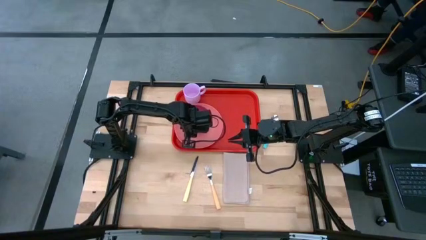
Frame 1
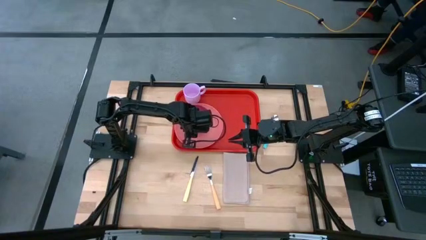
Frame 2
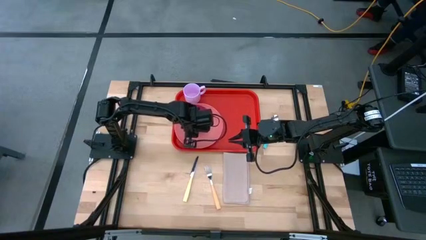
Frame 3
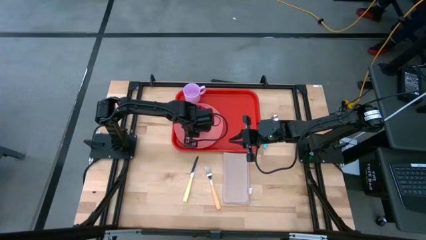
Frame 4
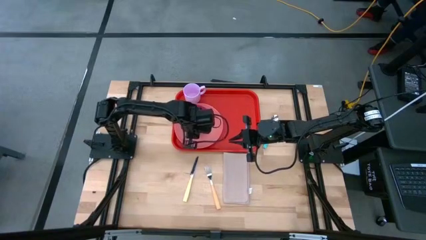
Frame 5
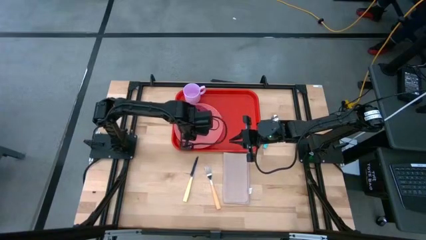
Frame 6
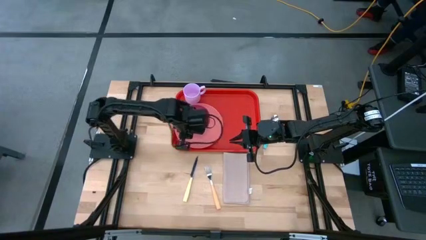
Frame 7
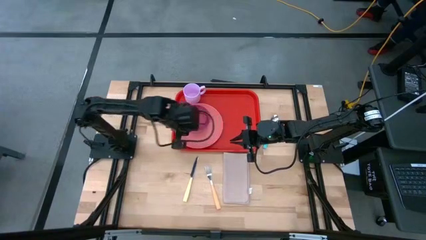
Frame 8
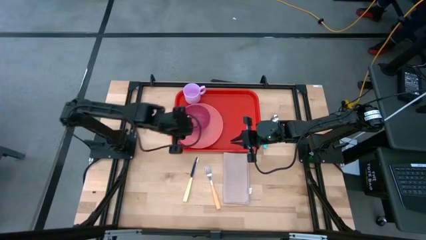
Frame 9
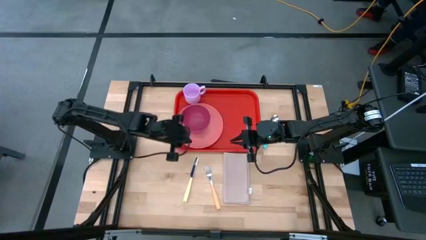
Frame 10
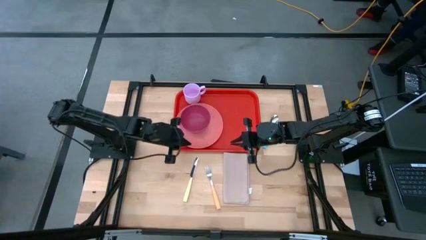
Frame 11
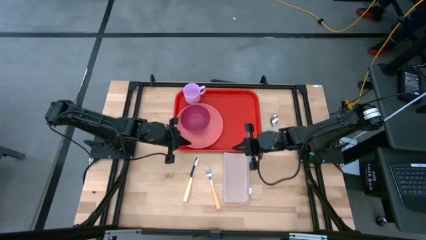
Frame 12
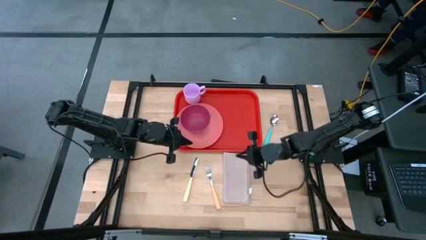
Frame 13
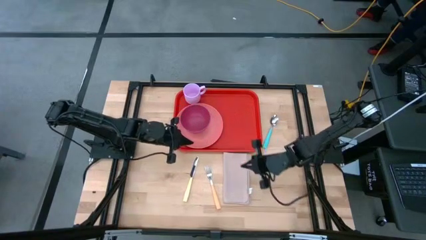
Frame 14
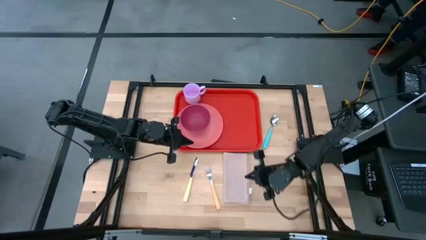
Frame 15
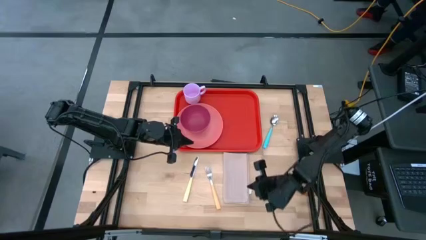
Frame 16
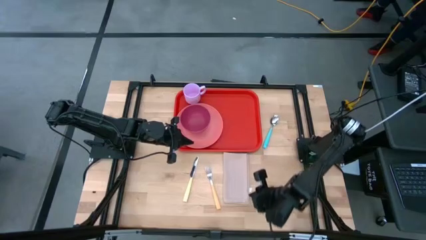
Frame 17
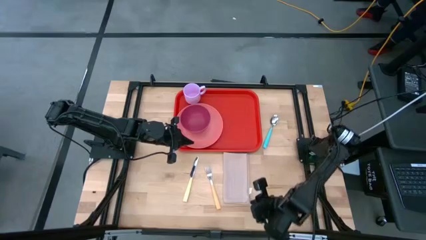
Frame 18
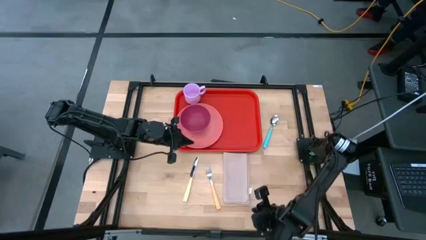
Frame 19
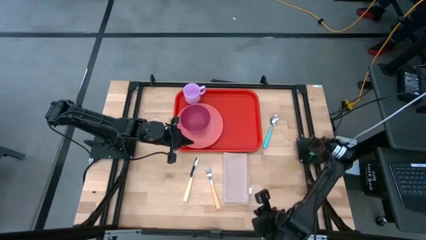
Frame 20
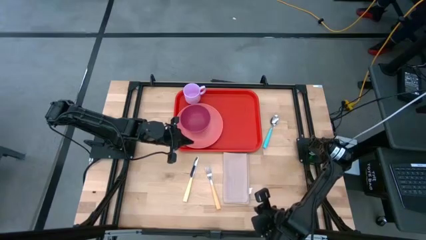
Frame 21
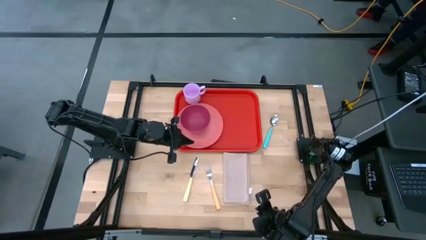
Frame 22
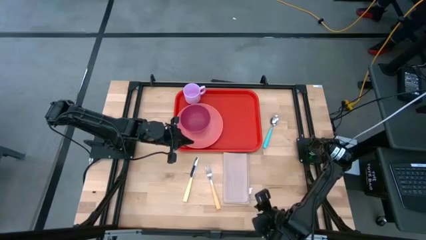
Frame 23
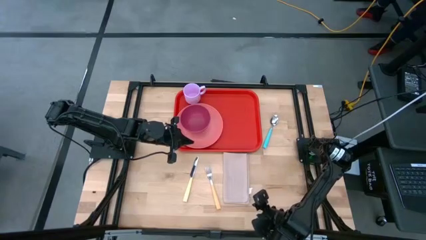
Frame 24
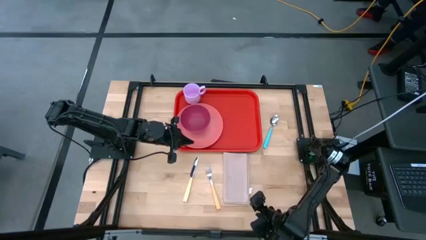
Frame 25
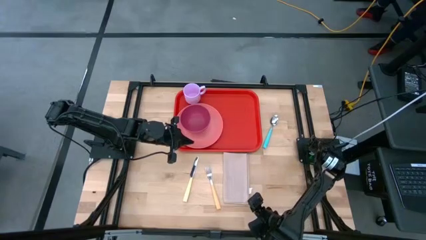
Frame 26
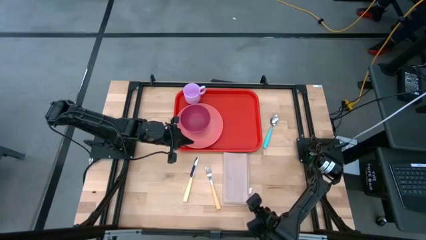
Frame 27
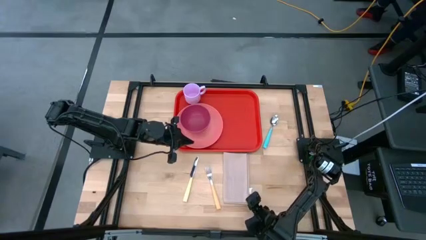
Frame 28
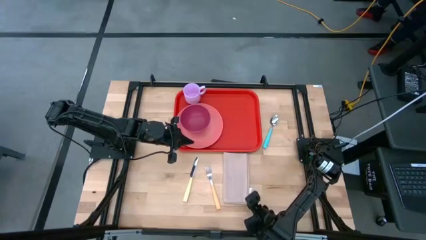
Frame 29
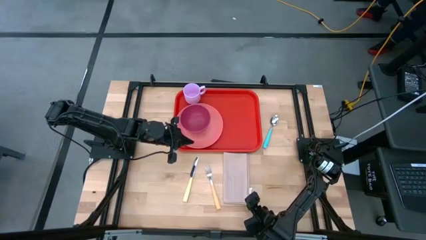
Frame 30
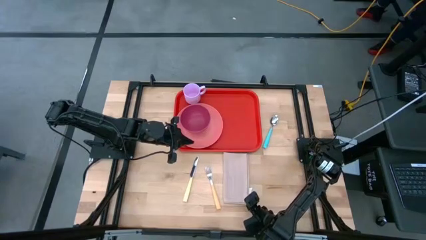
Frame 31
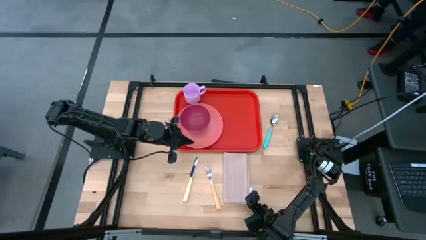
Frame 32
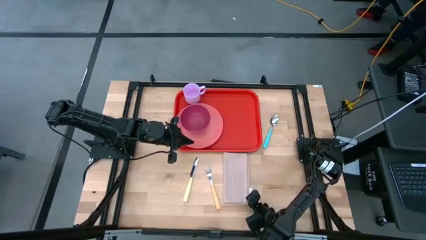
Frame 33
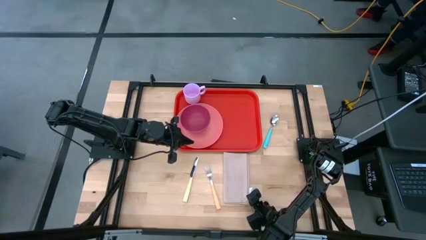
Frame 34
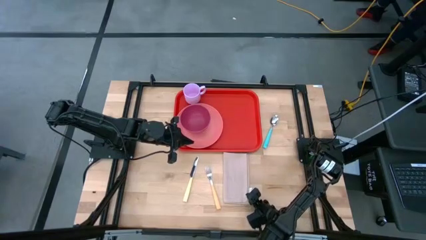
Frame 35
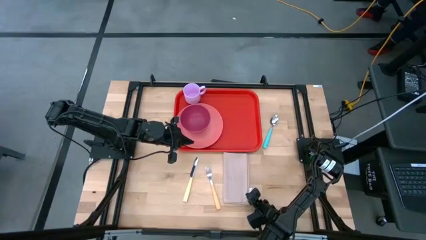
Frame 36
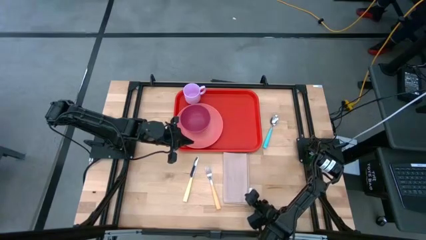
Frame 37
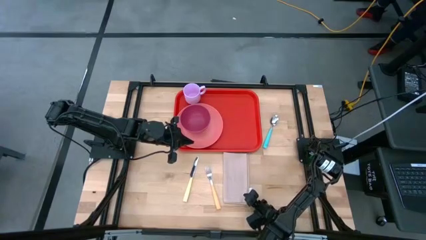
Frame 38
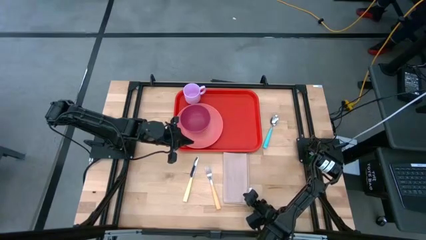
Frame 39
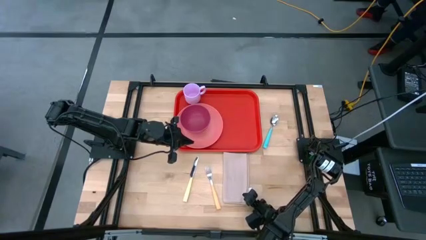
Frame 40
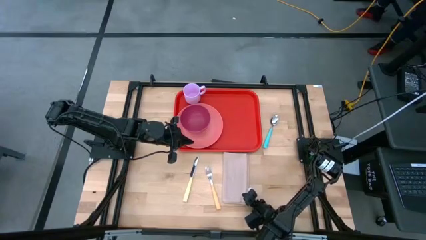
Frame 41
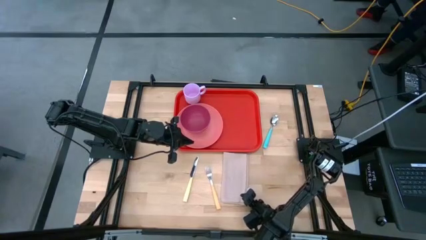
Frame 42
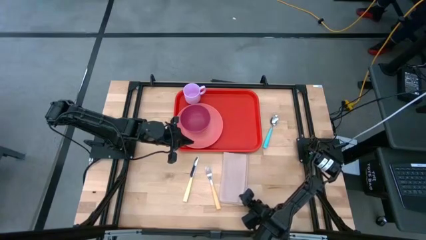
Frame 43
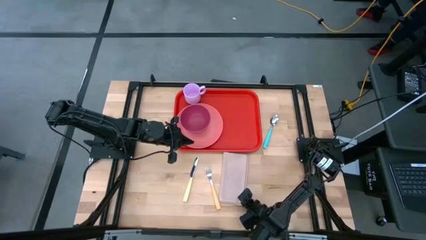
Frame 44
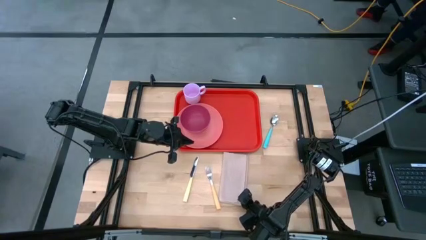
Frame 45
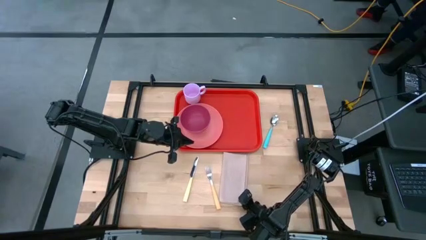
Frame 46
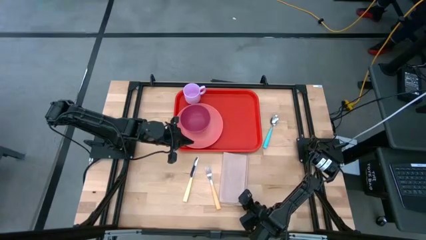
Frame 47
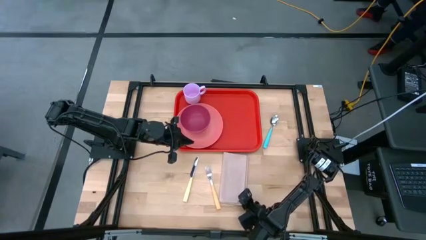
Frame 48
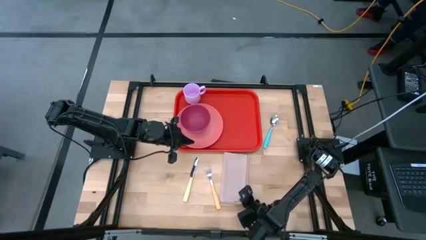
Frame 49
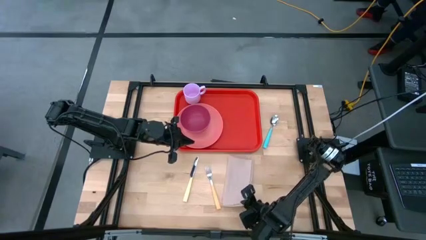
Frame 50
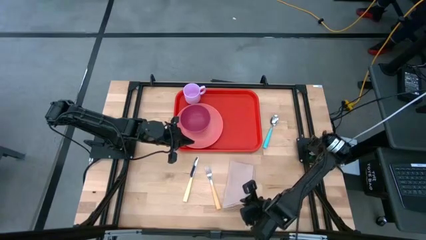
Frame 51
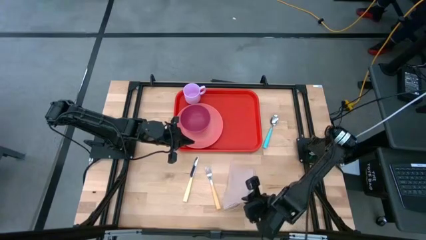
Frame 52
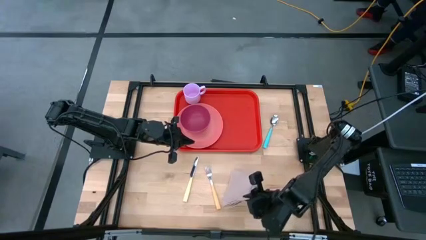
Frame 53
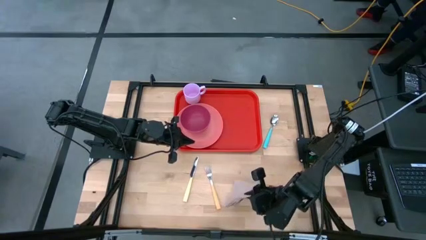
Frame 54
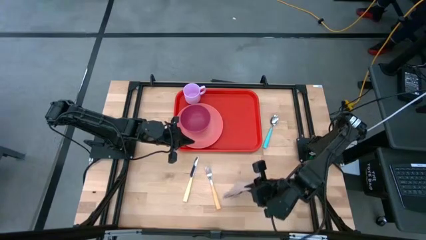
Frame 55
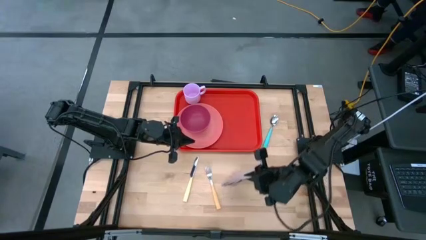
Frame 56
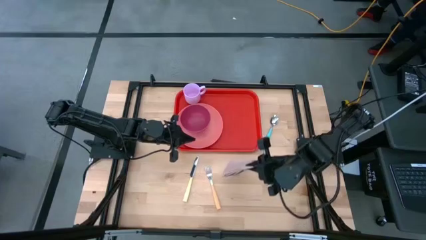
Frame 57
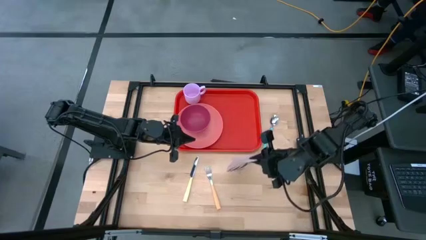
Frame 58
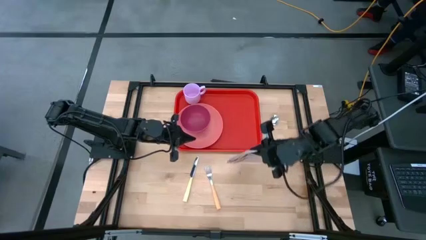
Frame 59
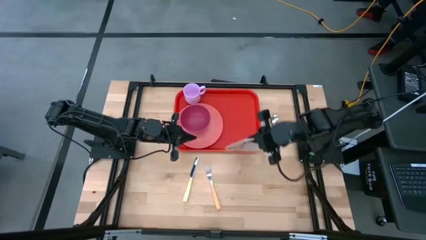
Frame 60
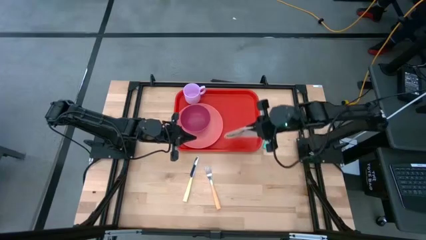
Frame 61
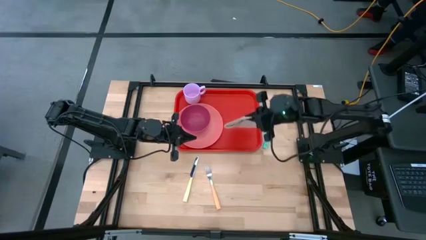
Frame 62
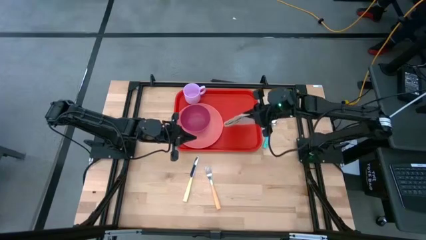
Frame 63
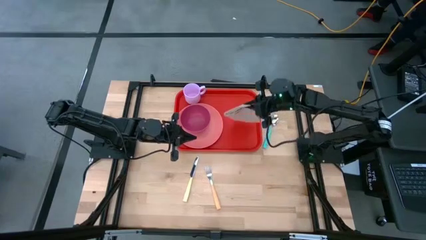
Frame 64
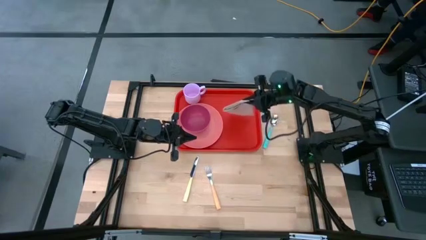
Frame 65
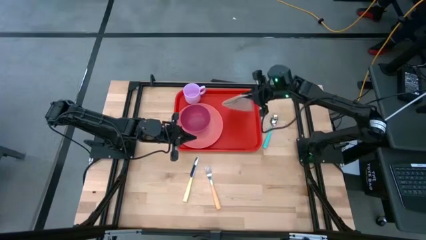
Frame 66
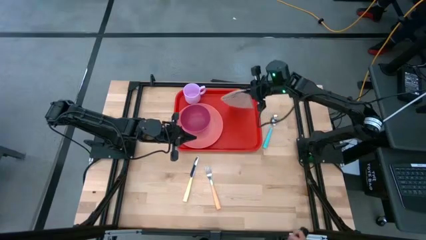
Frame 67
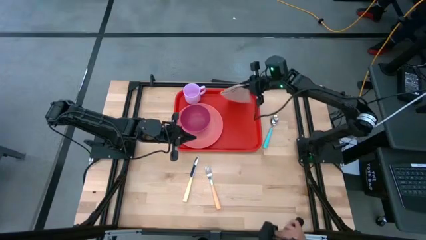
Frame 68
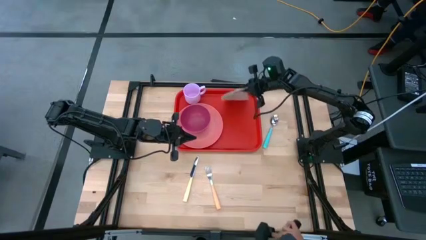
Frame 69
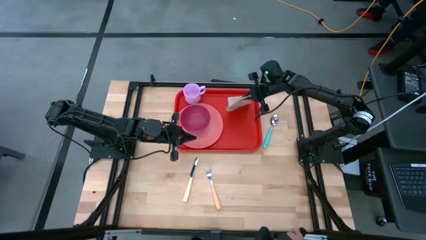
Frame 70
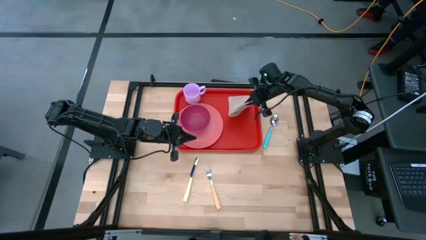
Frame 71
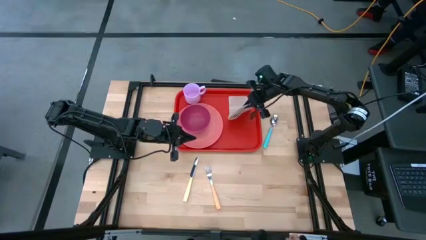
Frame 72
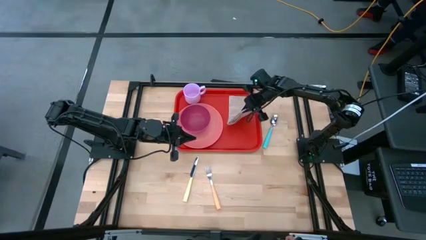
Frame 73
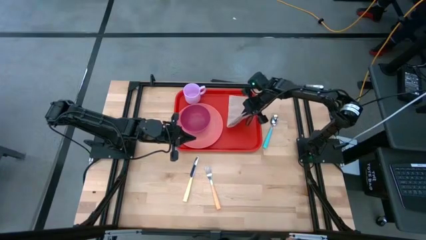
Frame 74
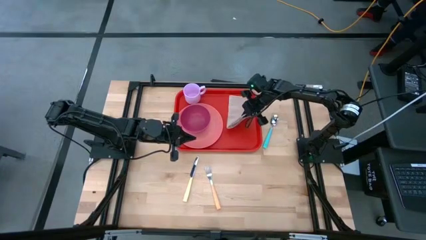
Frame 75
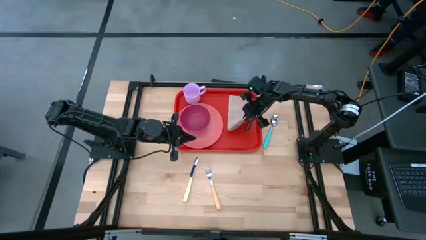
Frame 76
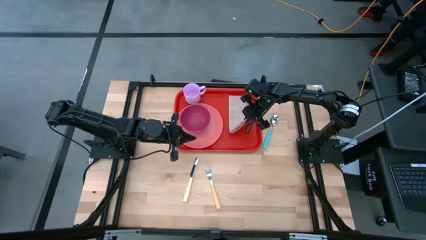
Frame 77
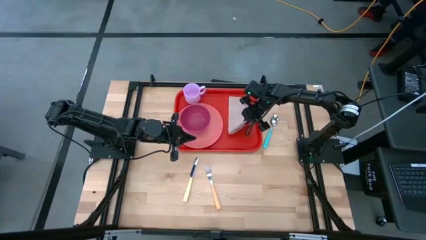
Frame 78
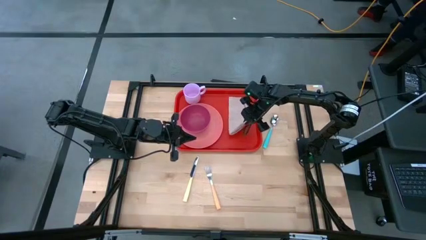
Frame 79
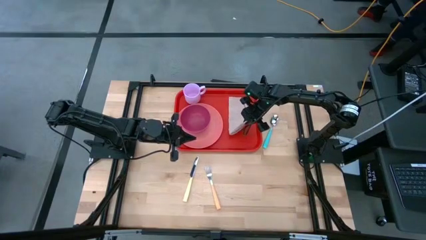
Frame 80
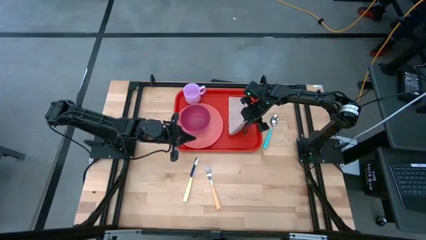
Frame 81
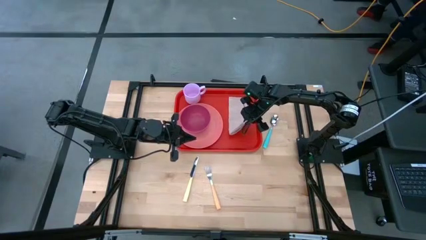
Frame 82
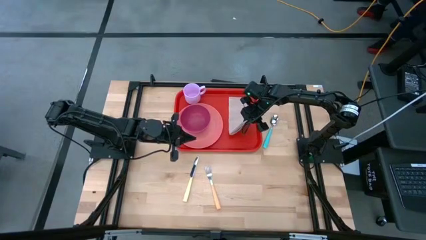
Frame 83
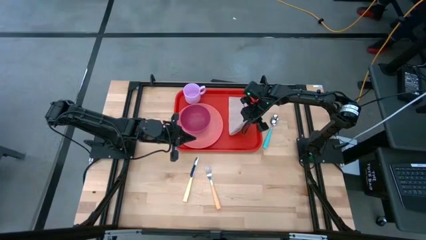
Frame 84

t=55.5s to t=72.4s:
Task: Set up tray
Put the brown napkin on the top right of the orange tray
